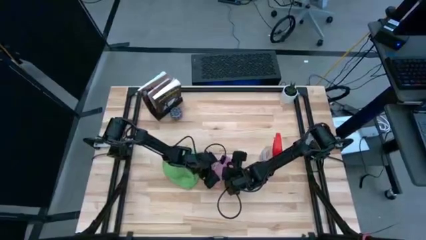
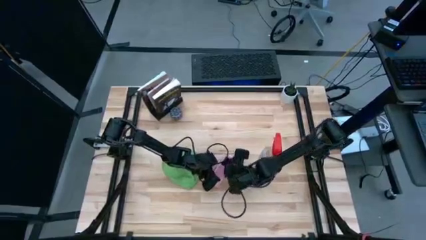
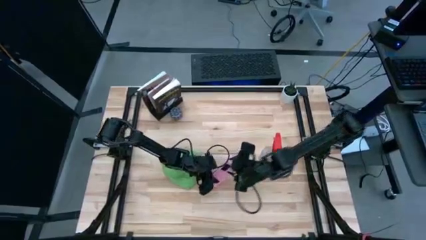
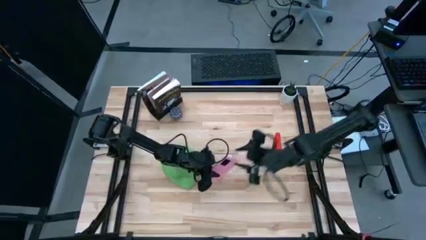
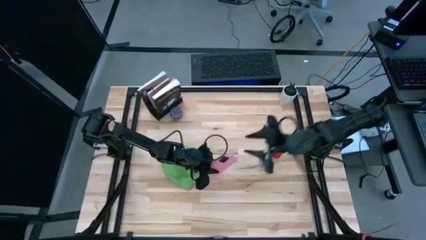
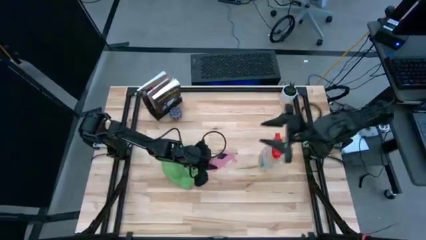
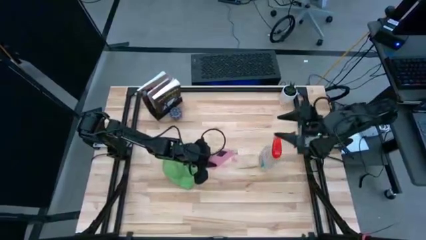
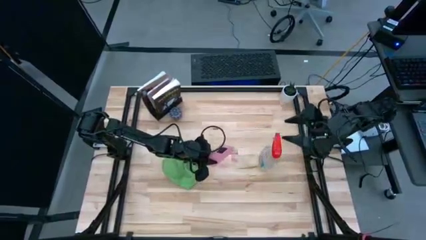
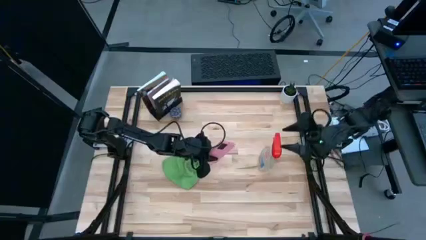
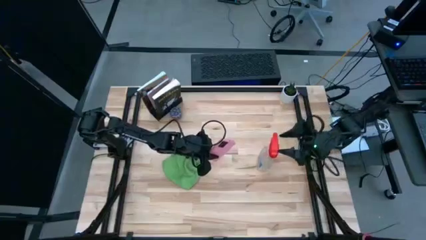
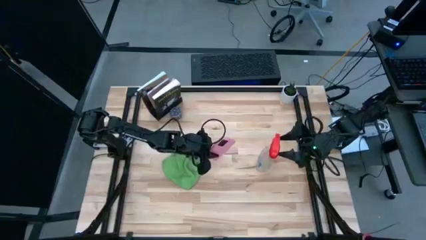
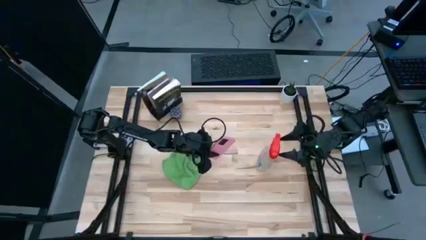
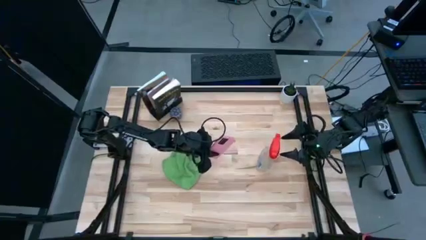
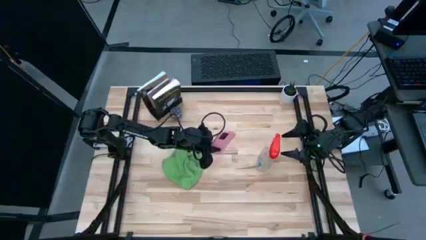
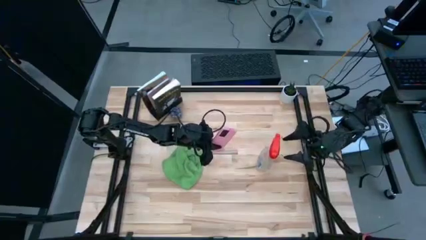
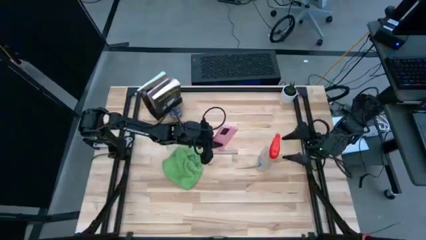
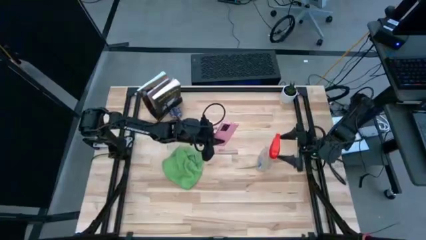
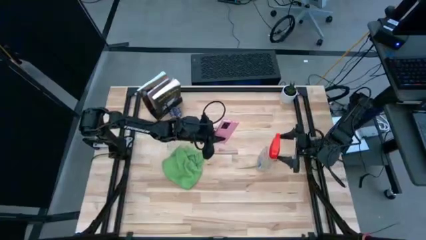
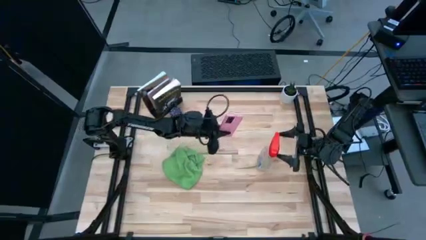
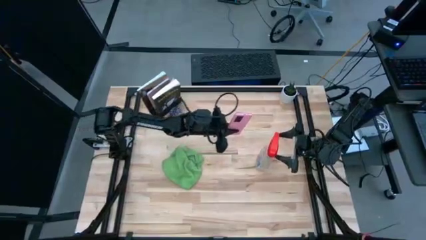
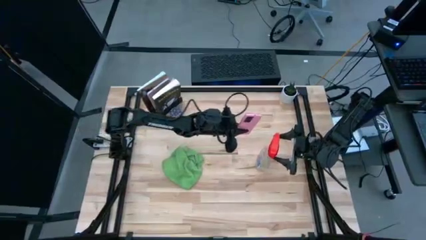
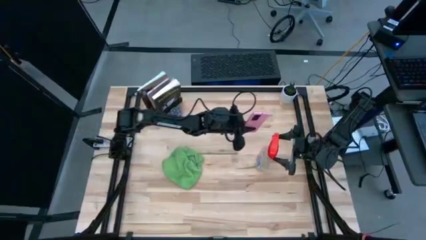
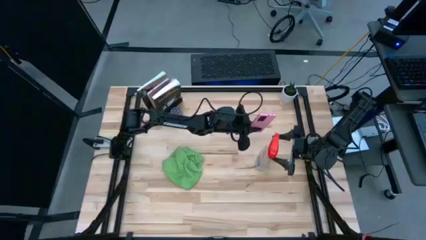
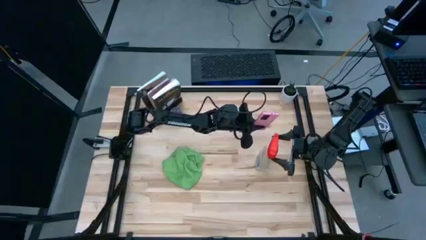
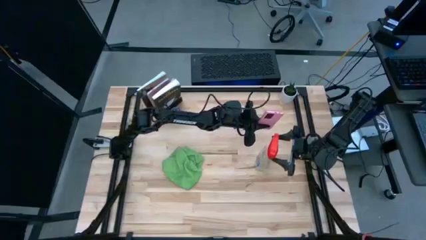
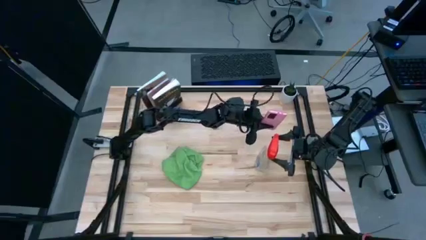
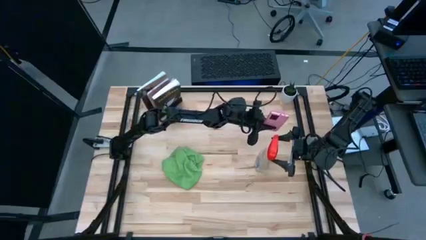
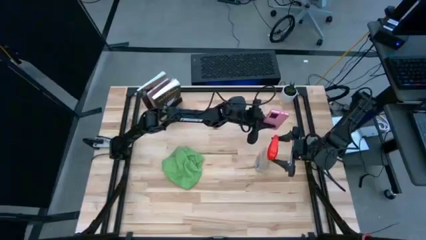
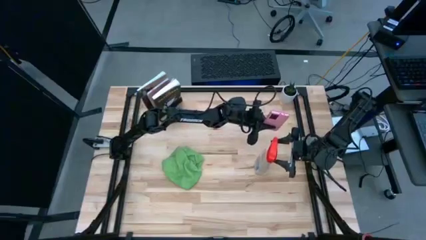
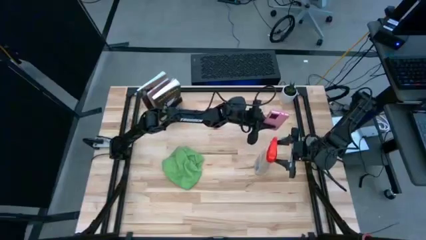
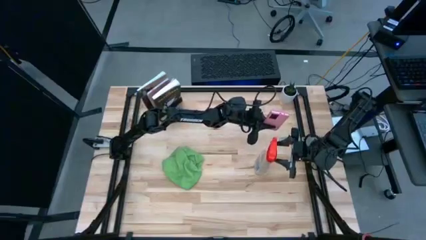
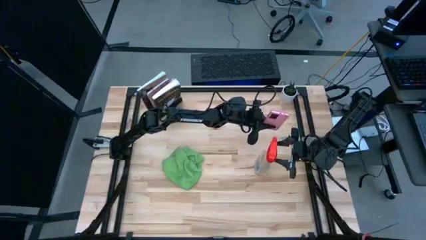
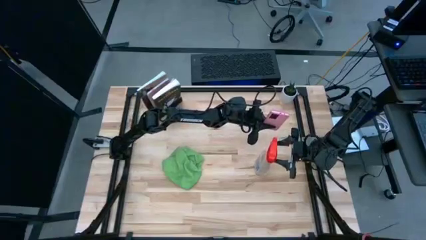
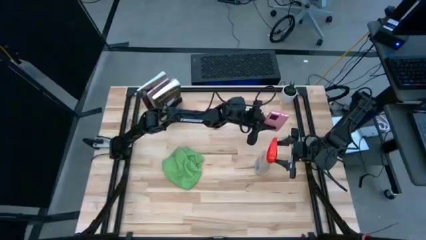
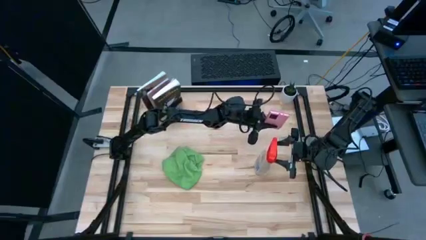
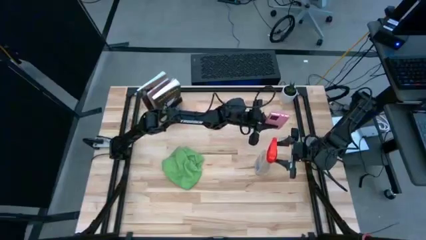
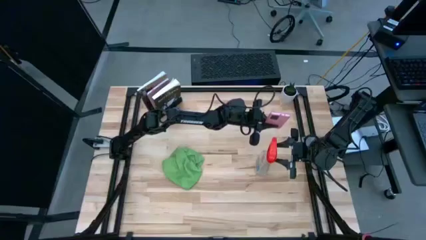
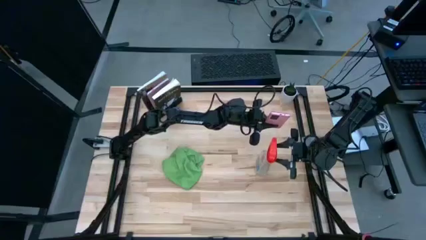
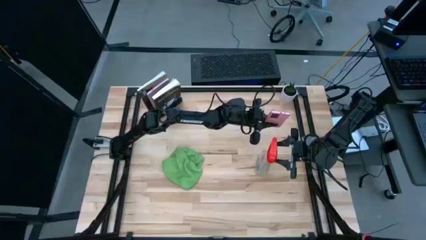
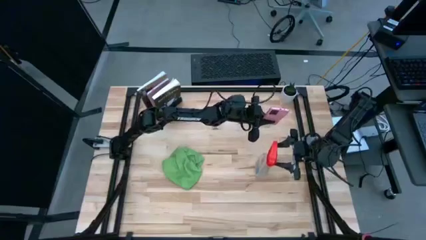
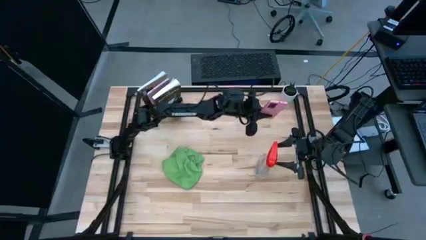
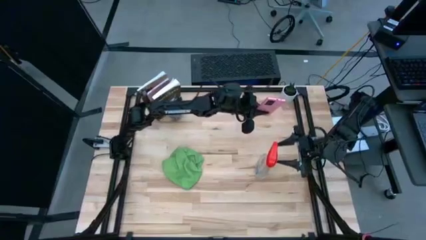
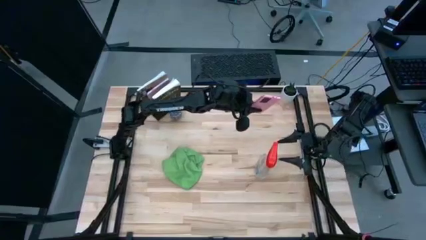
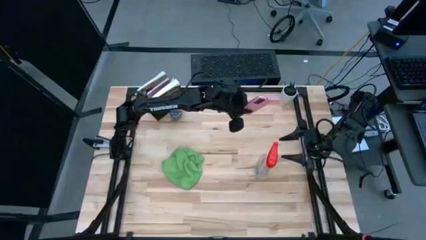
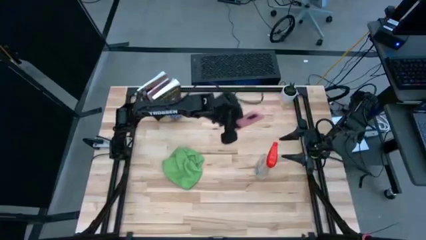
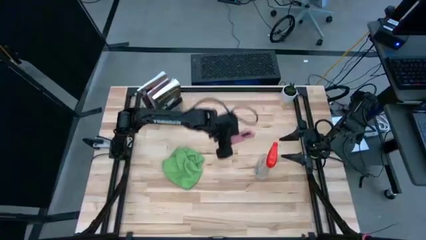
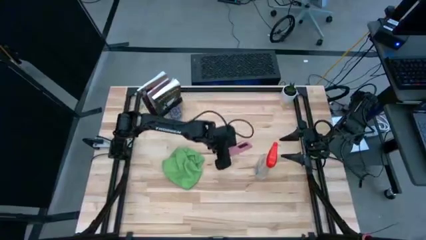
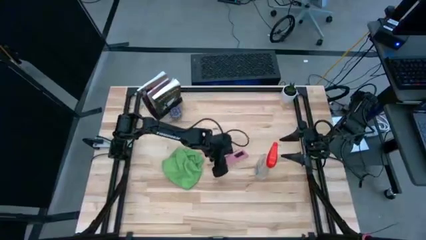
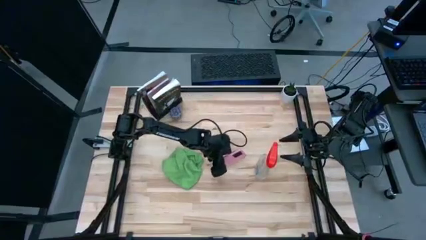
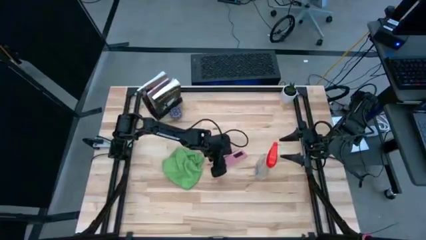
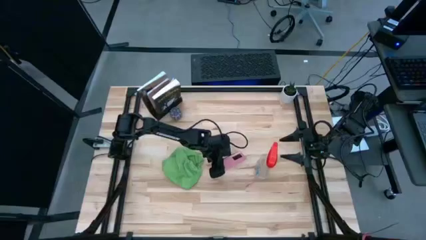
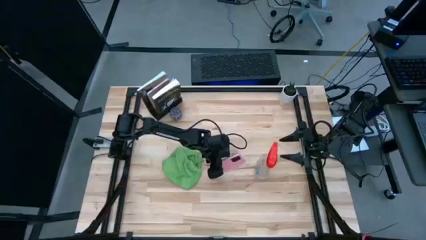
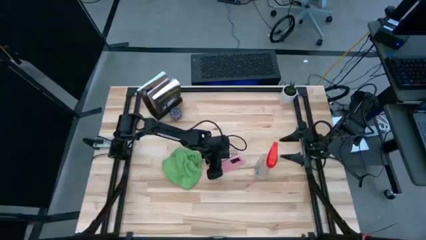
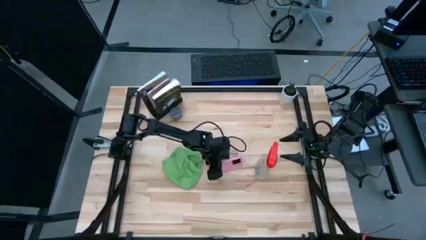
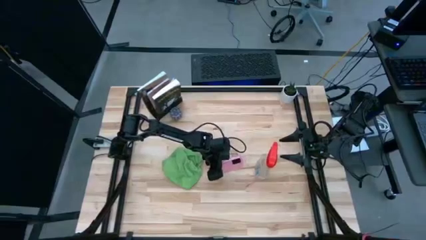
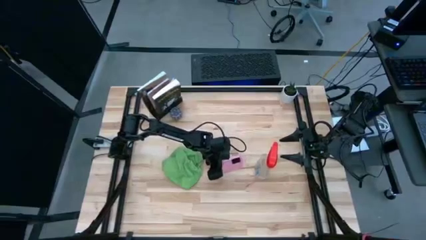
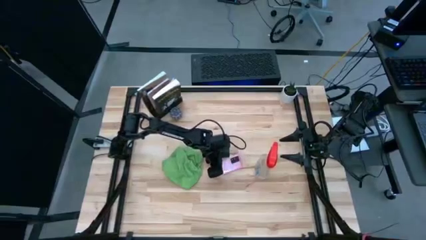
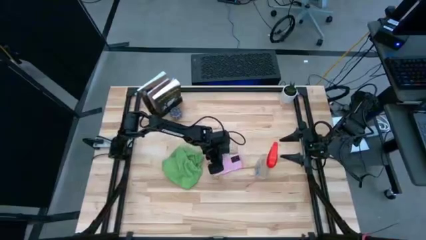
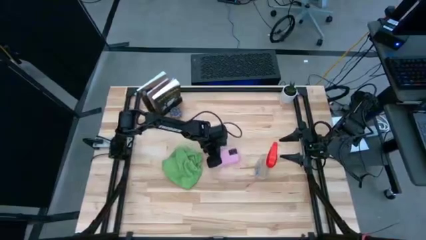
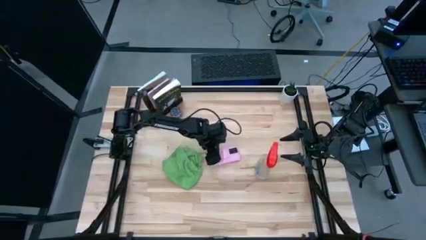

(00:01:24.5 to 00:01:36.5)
Task: Apply microfiber cloth
Spray the back of the pink cellphone with the red spray bottle
